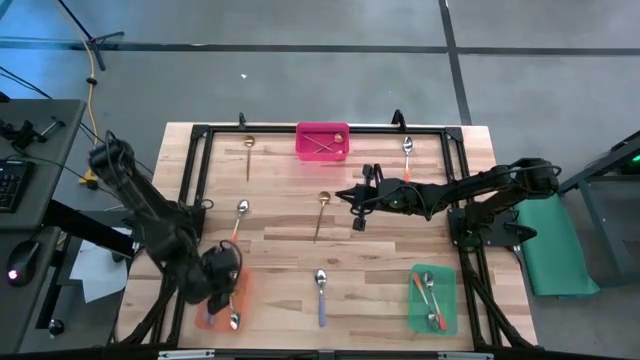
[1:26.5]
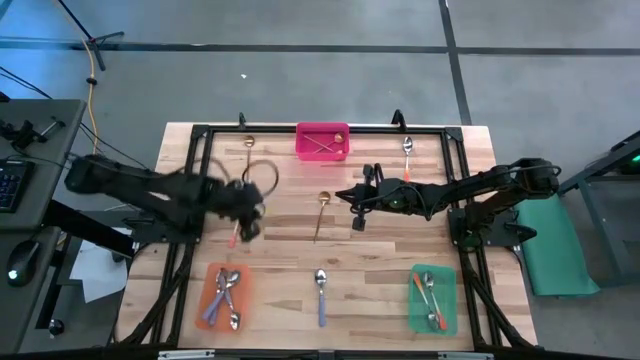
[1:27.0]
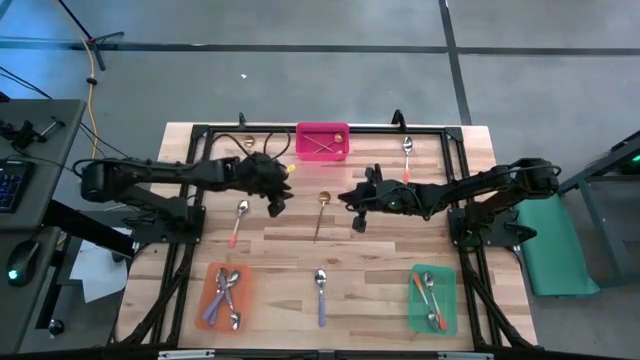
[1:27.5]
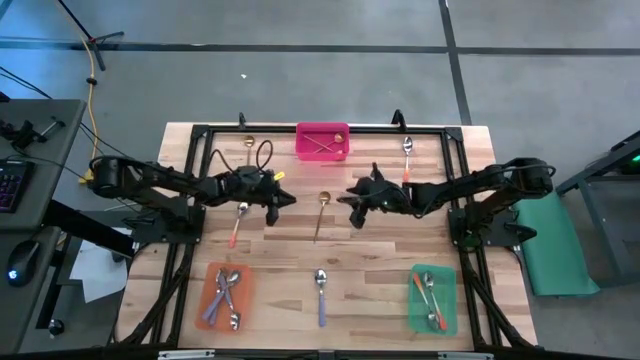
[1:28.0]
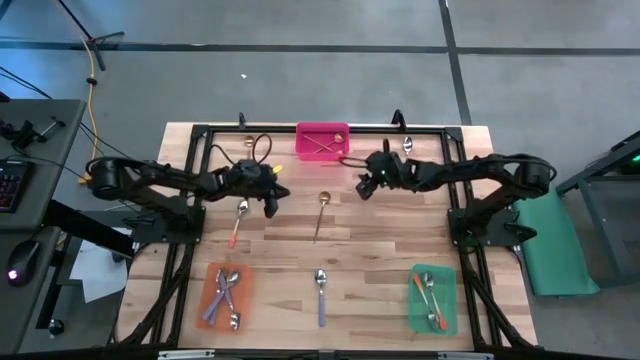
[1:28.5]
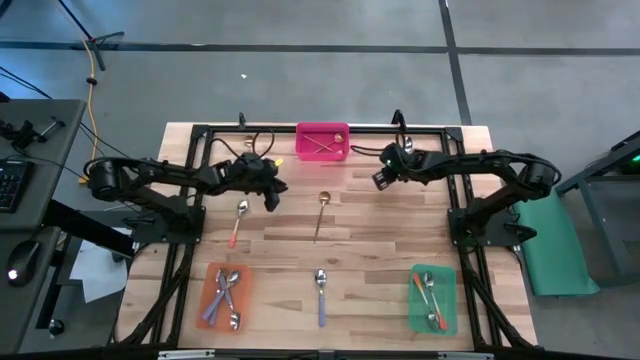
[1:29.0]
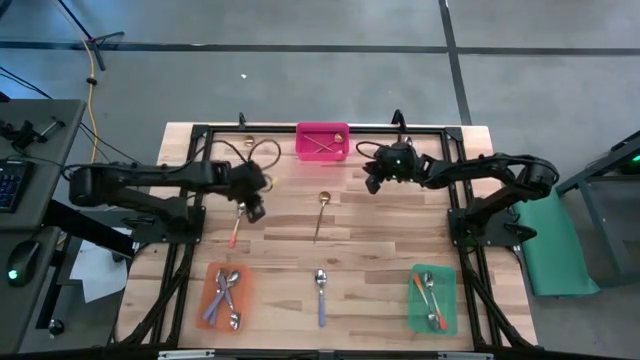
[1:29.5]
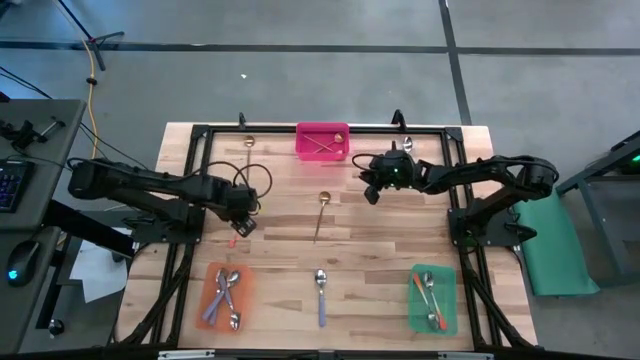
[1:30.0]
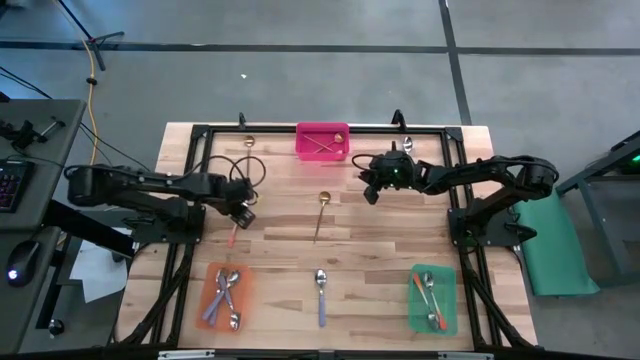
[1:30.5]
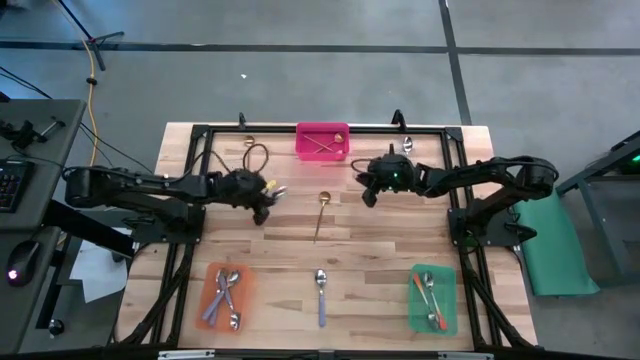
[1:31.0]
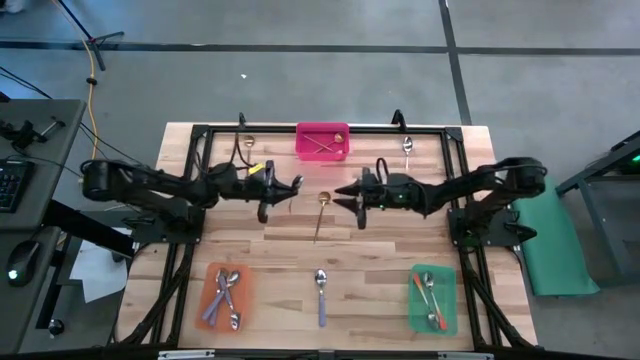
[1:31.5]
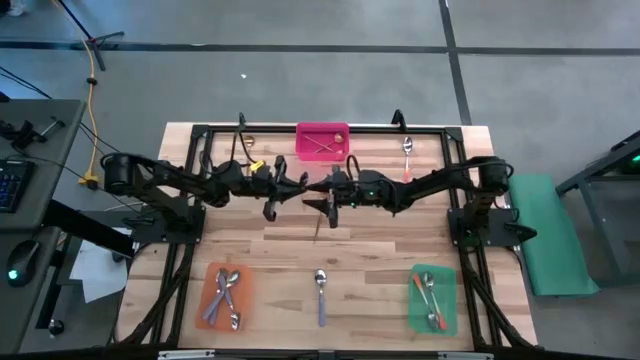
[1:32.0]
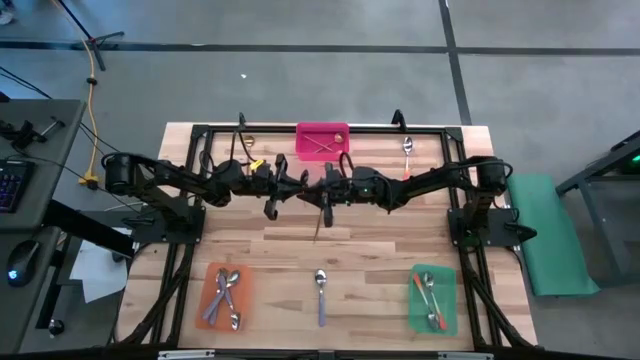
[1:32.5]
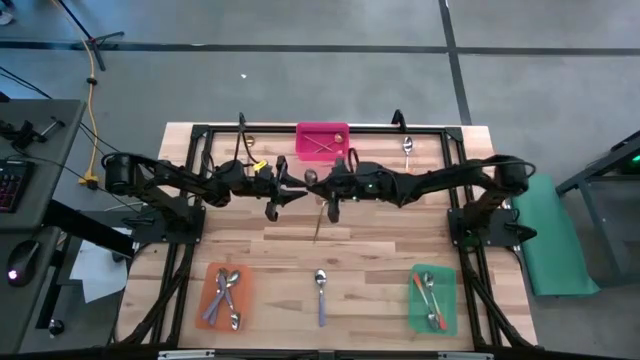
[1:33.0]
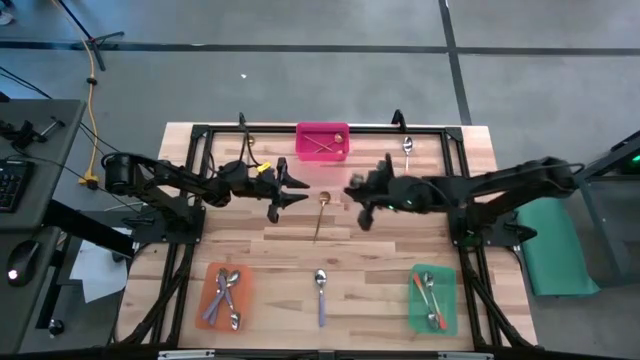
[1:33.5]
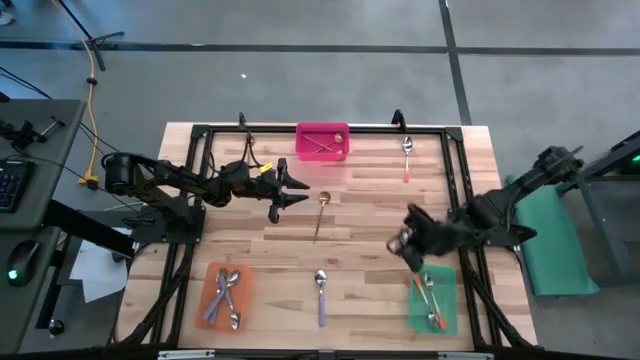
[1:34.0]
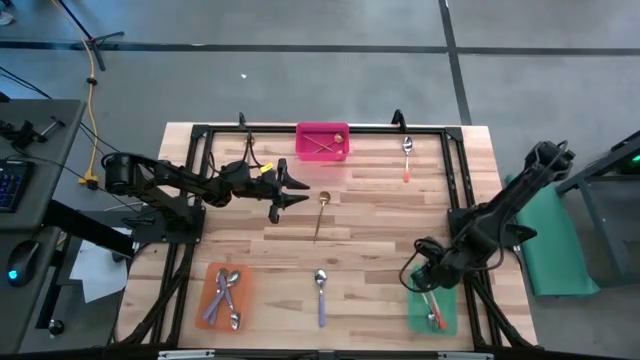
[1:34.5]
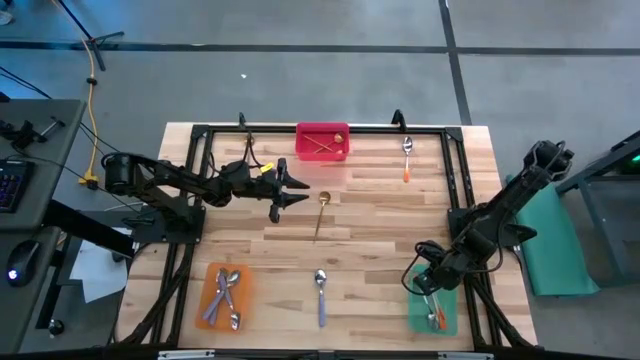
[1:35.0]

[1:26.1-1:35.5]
Task: Sort silverware by color (type)
Put the orange spoon into the green bin

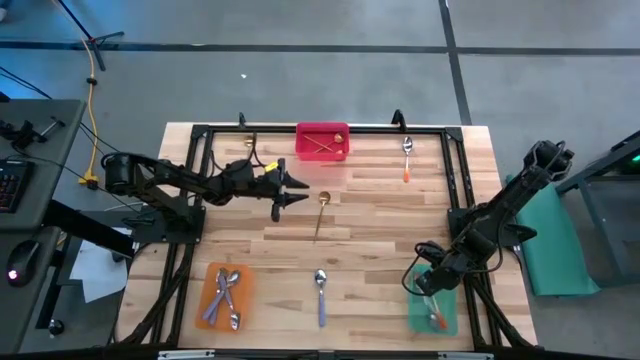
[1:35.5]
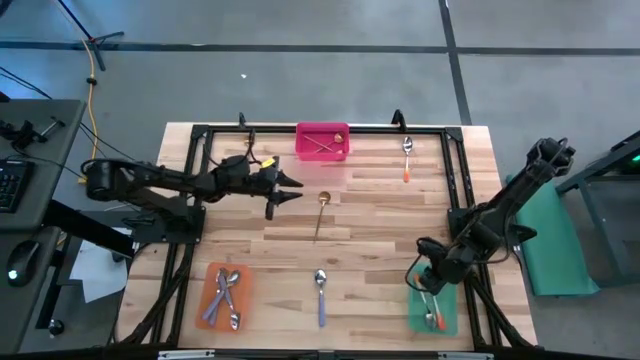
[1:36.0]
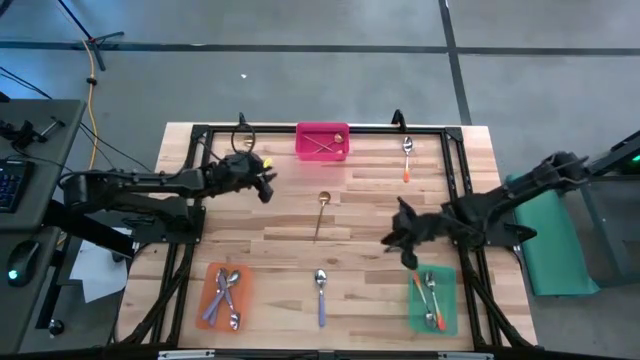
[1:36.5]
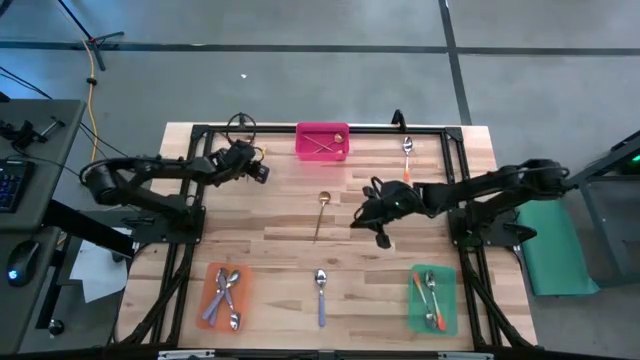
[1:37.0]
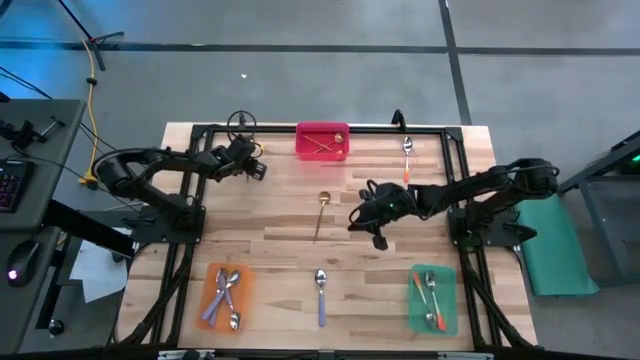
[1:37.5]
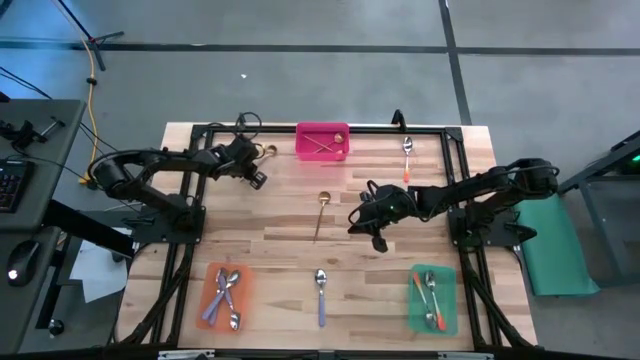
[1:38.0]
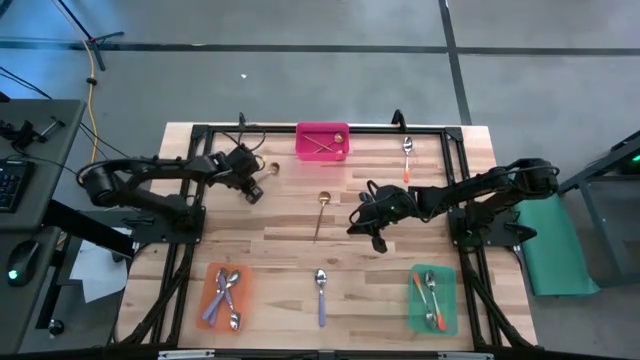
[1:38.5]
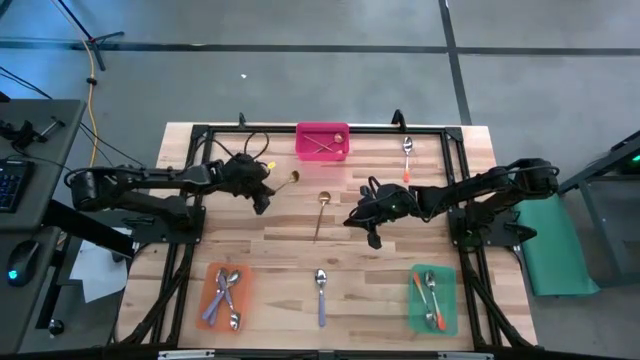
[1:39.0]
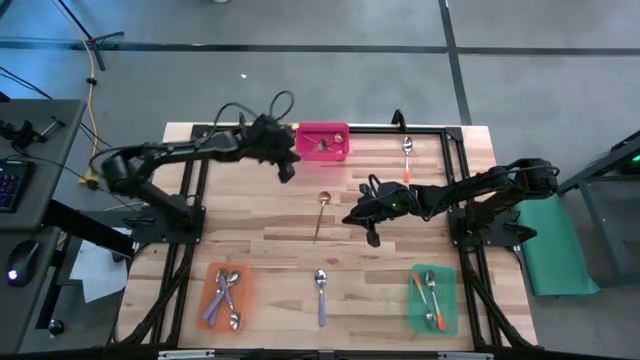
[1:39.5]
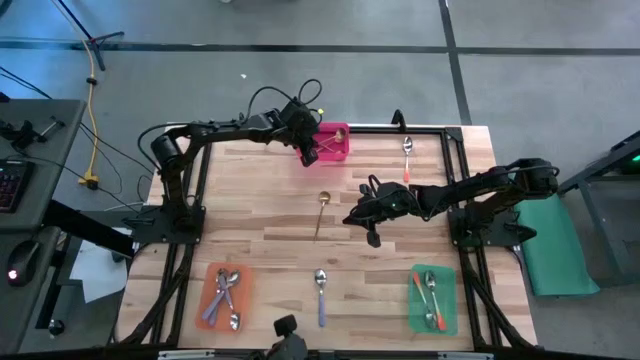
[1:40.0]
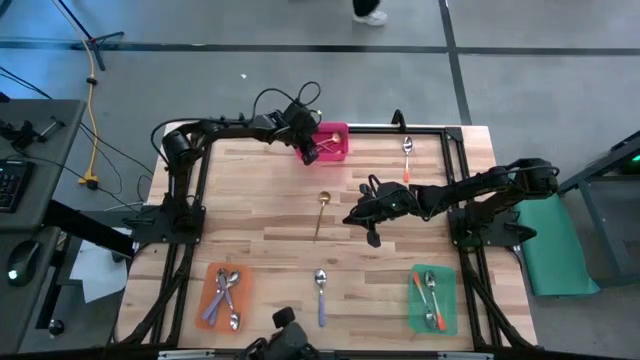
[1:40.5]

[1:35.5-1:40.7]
Put the gold spoon into the red bin

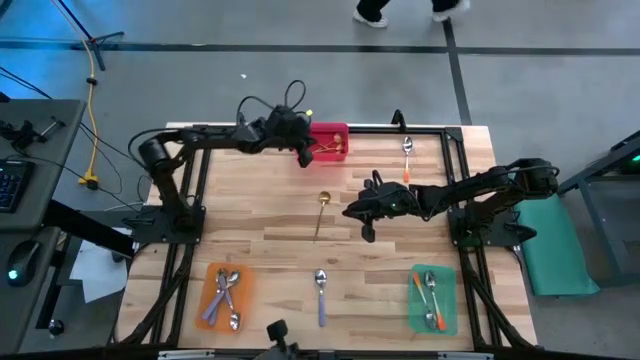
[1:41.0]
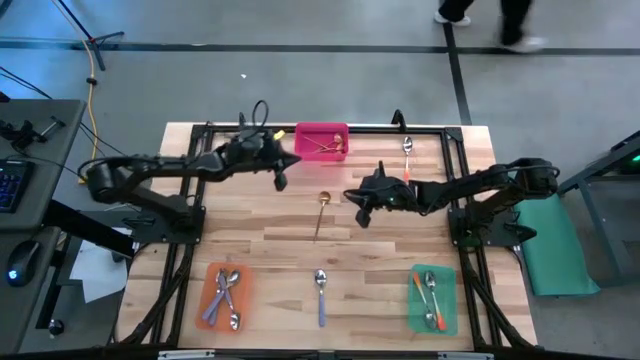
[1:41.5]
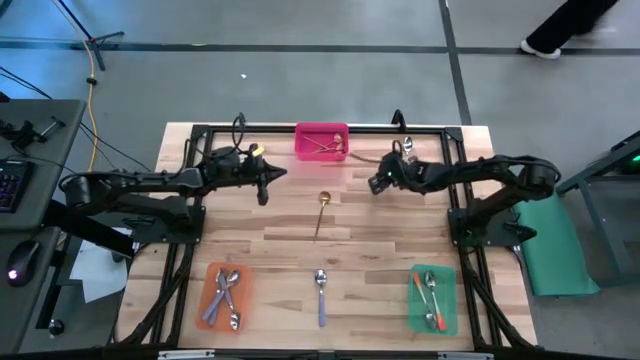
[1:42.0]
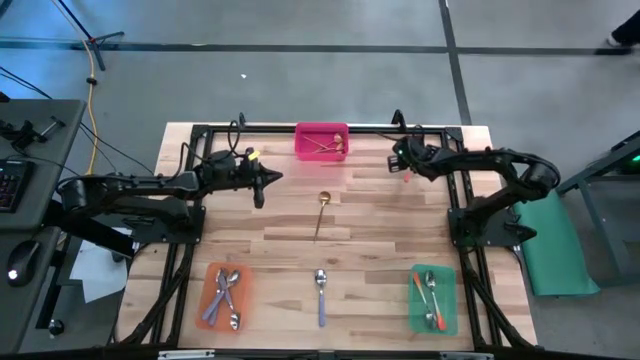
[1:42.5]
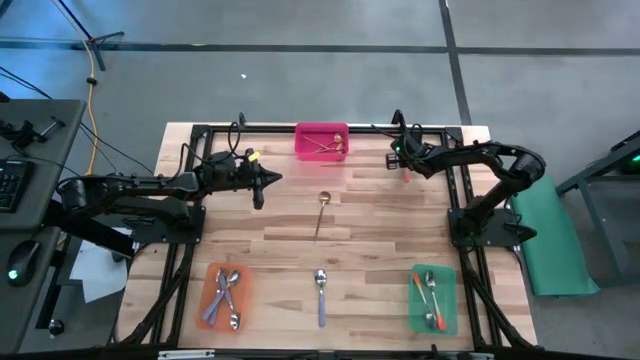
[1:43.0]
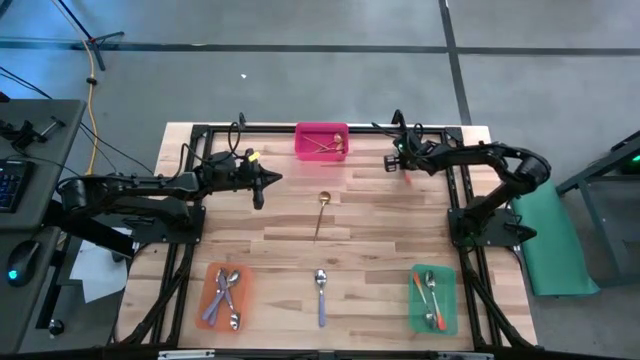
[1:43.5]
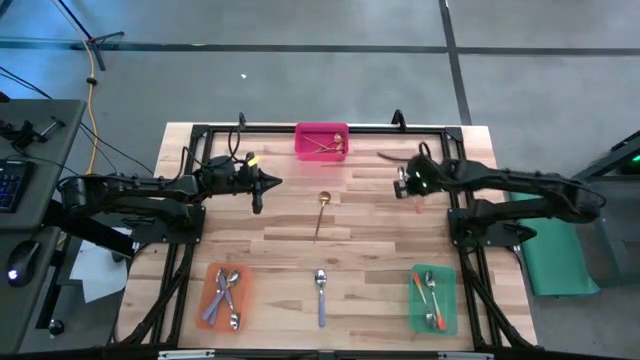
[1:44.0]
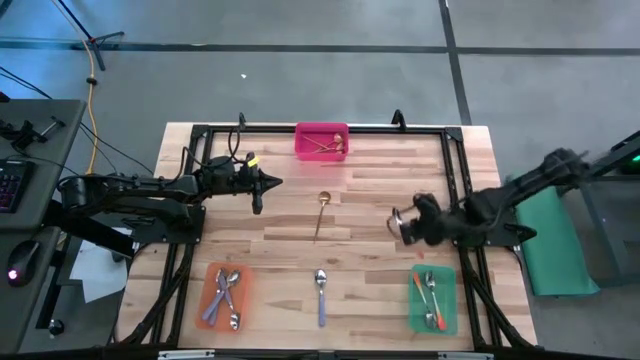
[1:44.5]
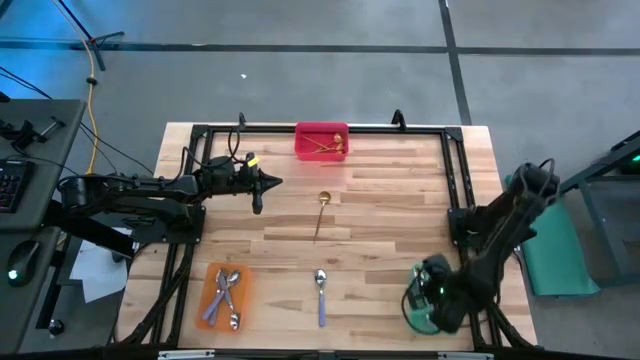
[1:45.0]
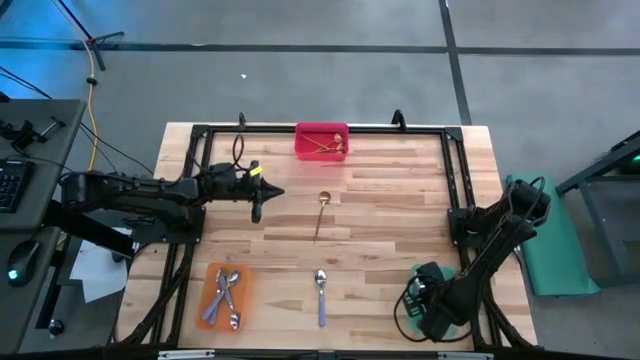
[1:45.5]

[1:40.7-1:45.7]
Put the orange spoon into the green bin

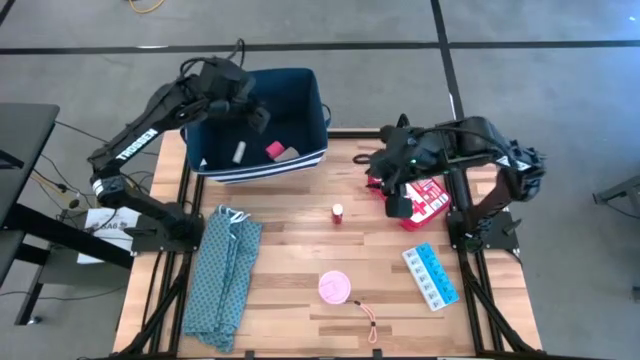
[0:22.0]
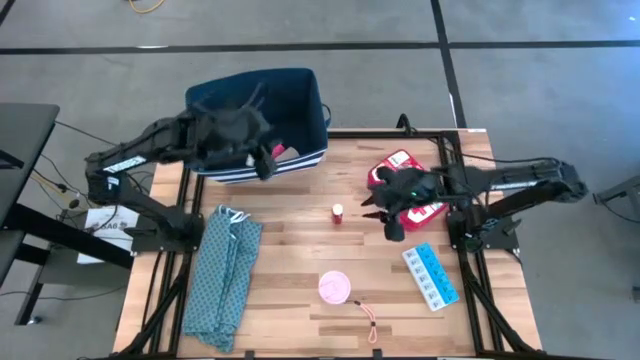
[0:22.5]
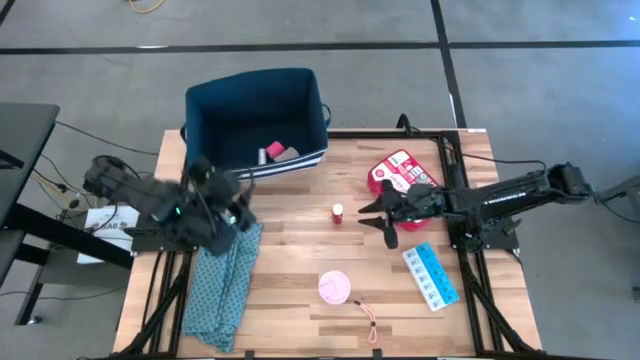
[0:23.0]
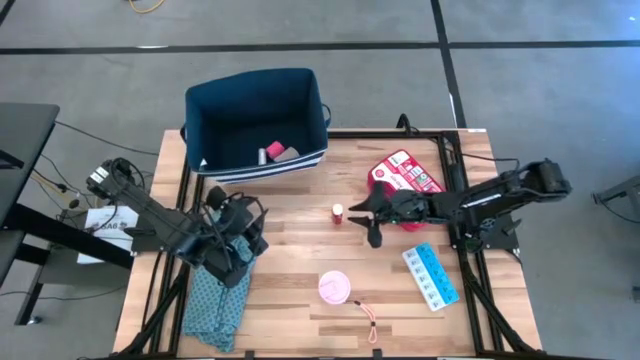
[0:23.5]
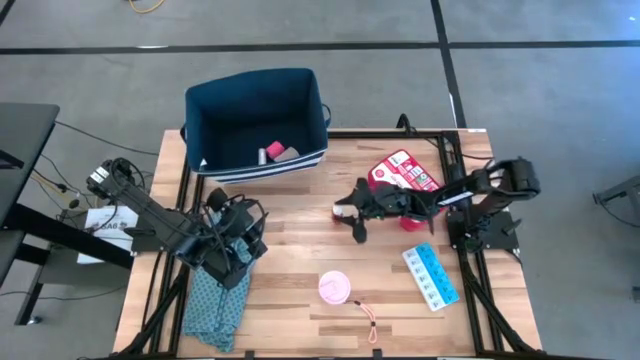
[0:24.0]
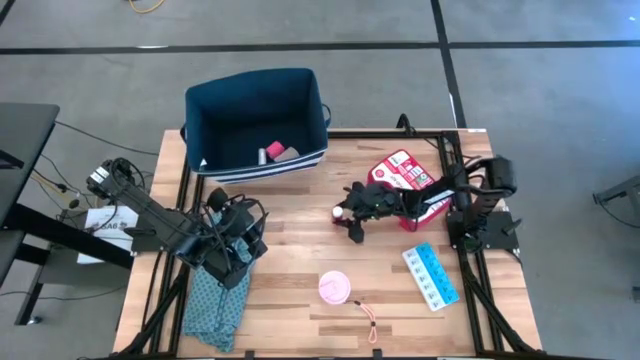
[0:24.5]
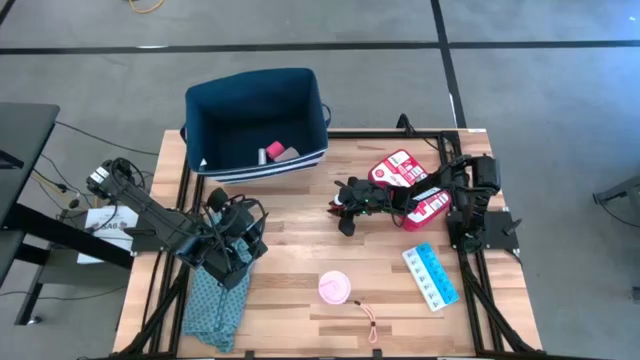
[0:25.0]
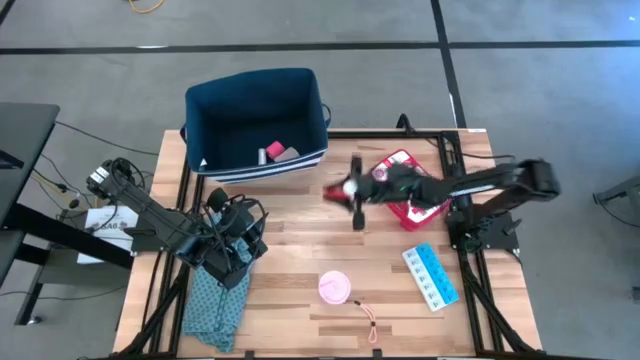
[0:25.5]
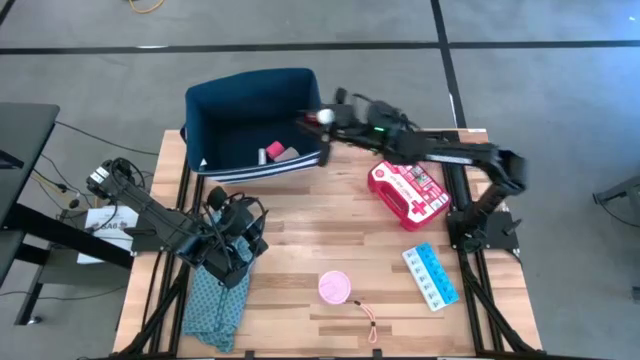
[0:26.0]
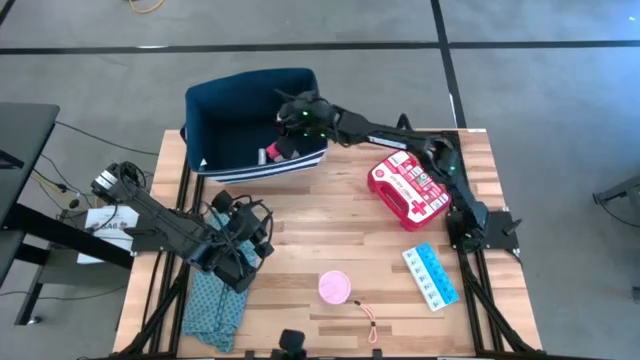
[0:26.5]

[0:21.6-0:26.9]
Task: Pick & place medical supplies in basket/bin
Put the red pill bottle into theblue bin
